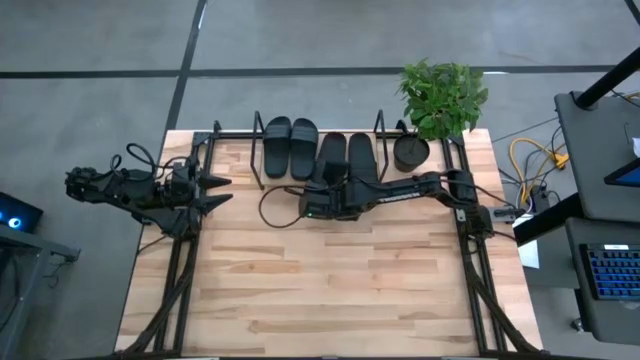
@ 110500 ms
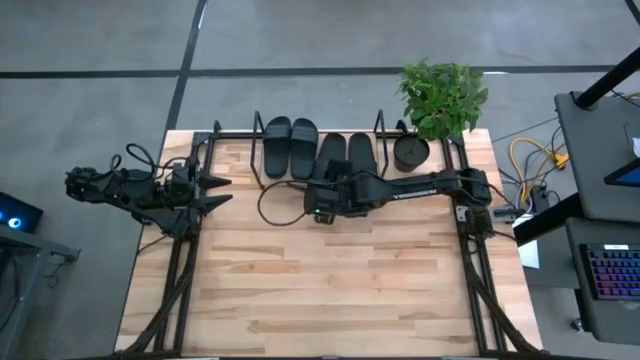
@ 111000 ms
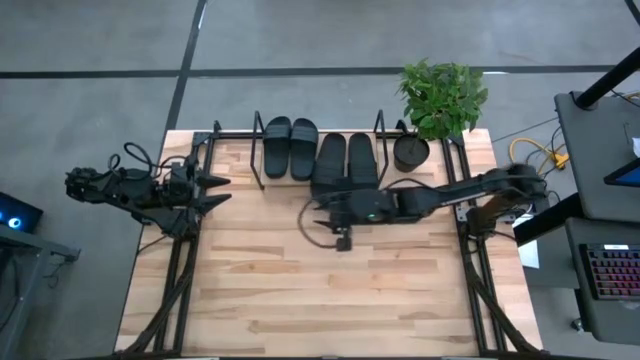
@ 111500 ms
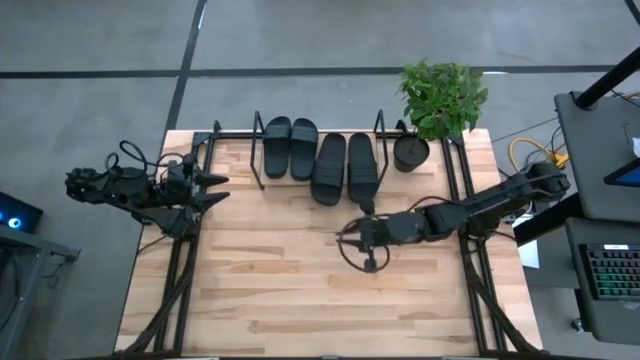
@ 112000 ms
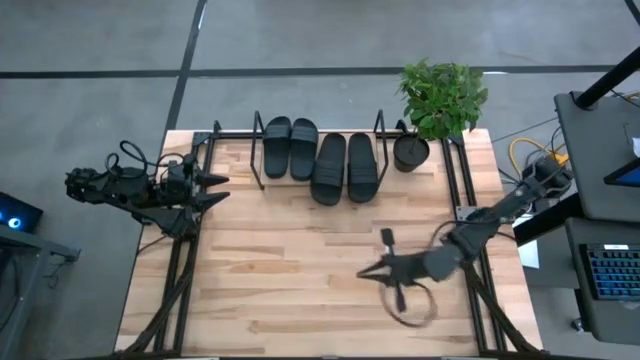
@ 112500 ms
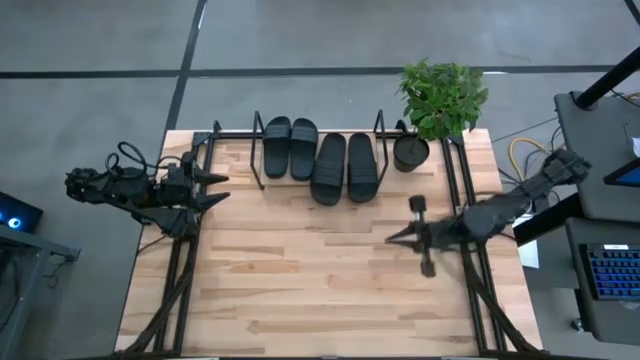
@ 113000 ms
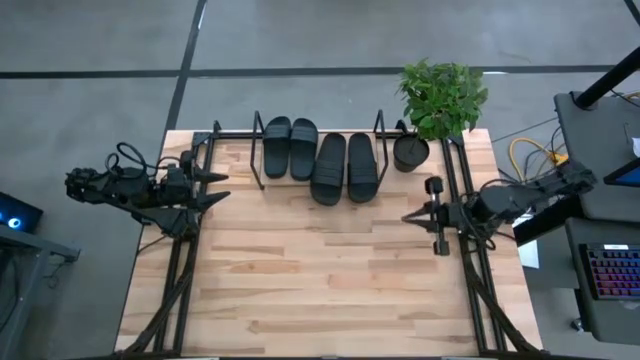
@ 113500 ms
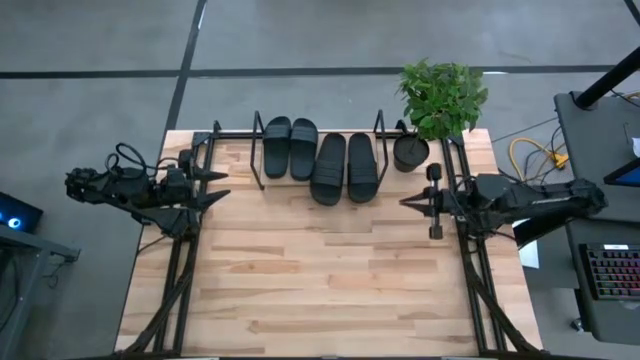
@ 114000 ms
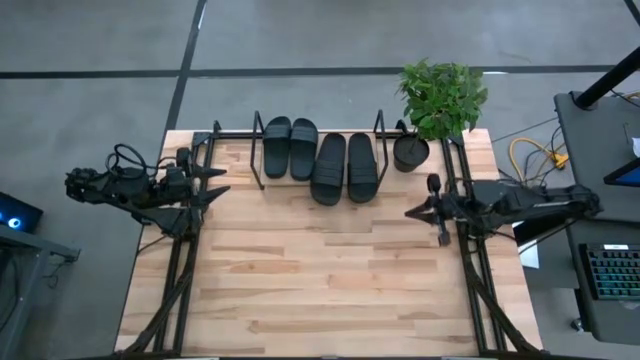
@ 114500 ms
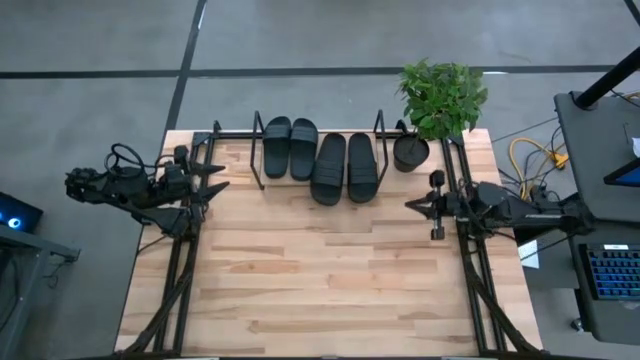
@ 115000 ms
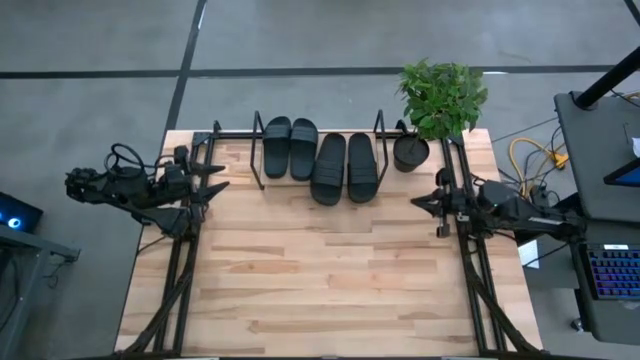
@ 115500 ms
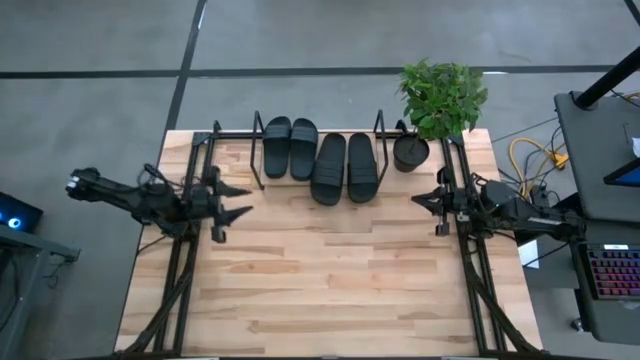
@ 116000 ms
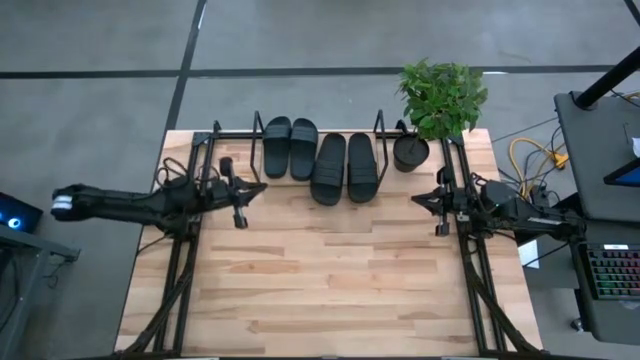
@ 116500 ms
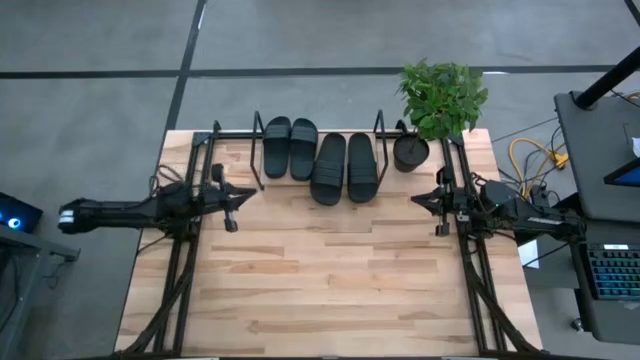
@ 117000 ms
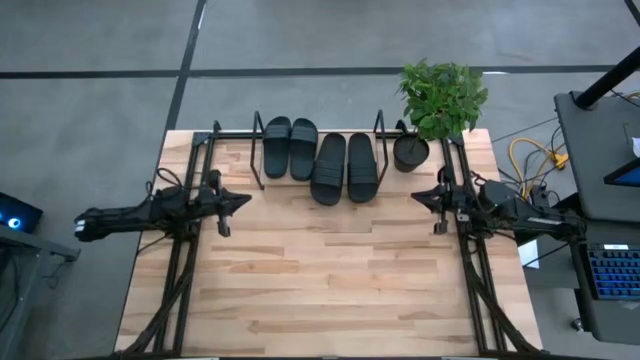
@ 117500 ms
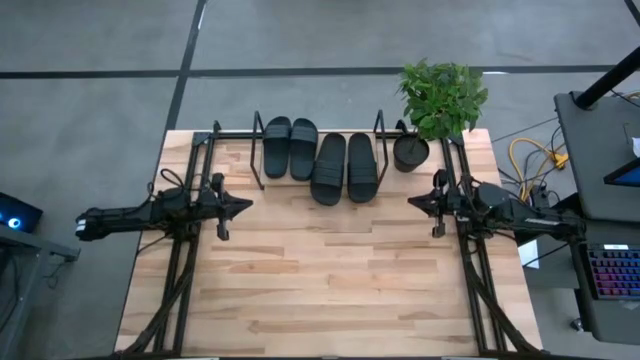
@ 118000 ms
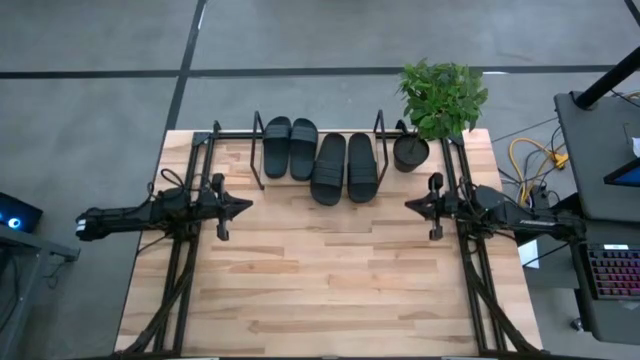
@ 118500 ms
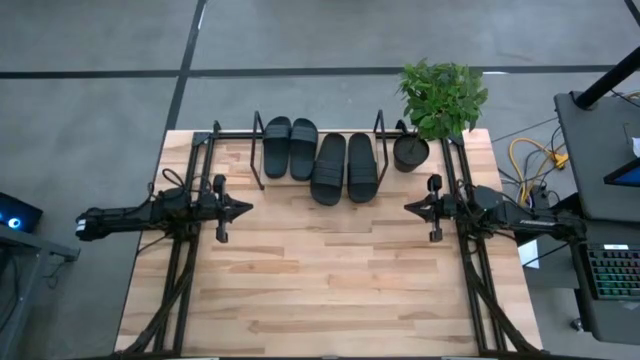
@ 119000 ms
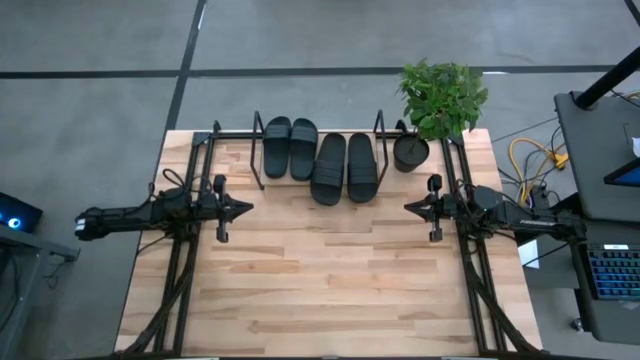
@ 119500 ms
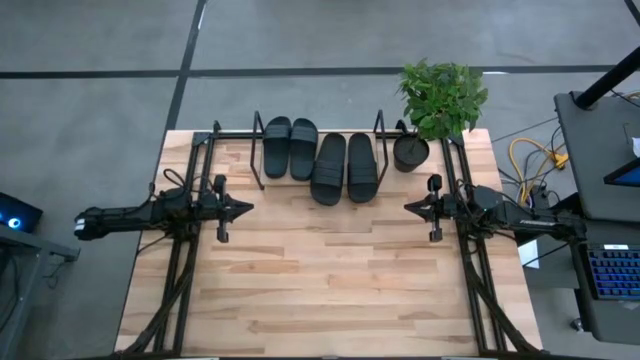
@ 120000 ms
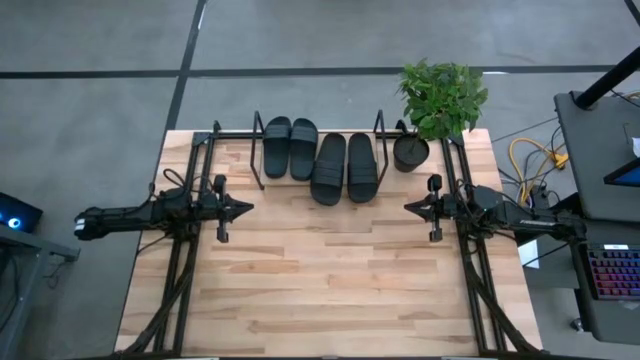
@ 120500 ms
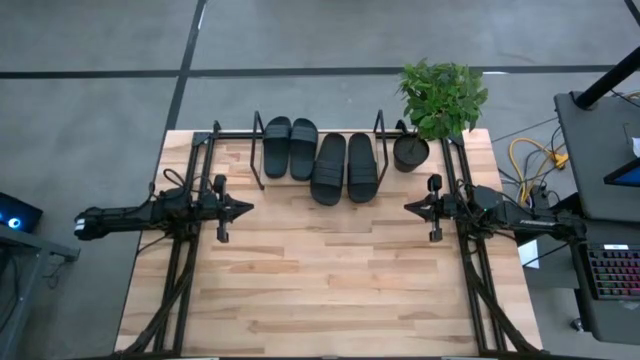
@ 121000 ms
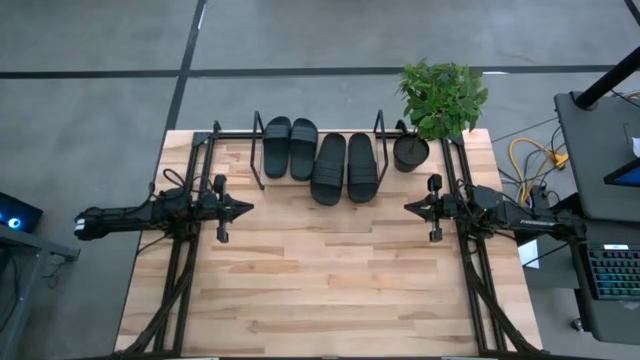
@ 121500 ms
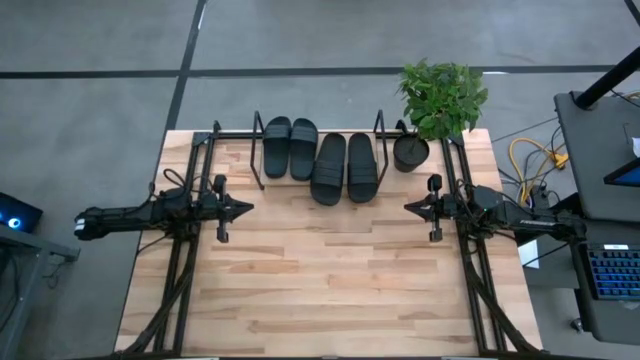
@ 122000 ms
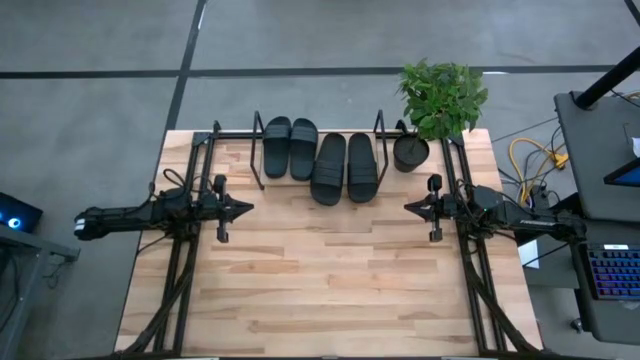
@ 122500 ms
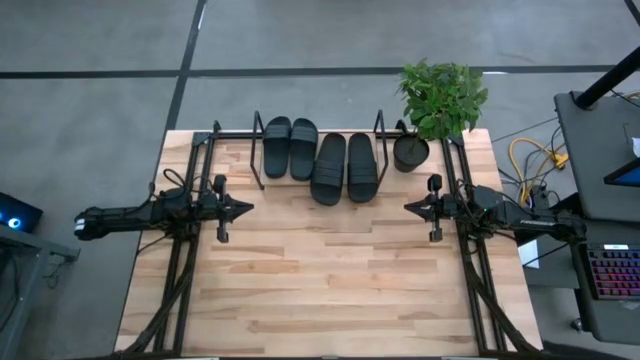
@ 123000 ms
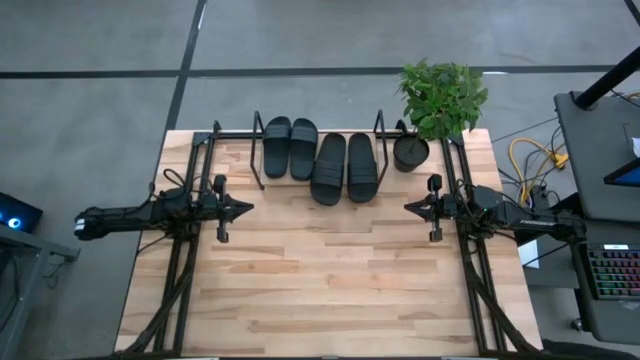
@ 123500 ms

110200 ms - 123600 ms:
Task: Pick and place slides into the shelf
Return to home position

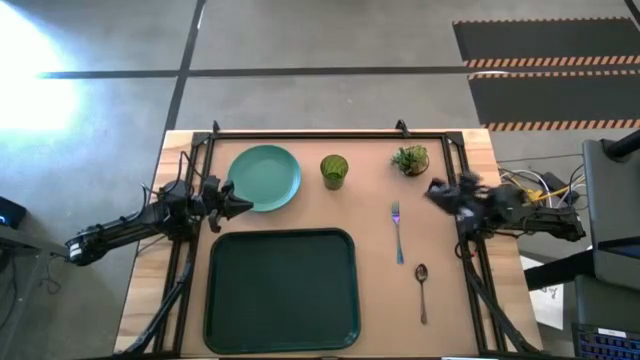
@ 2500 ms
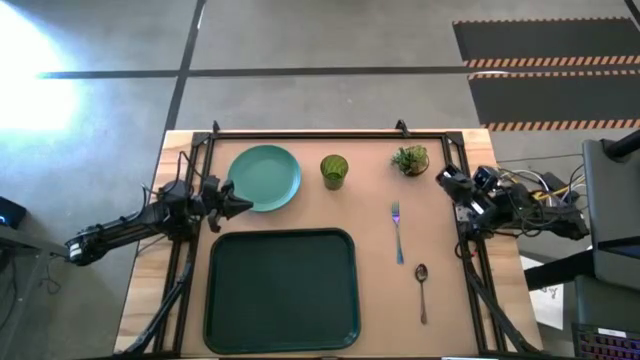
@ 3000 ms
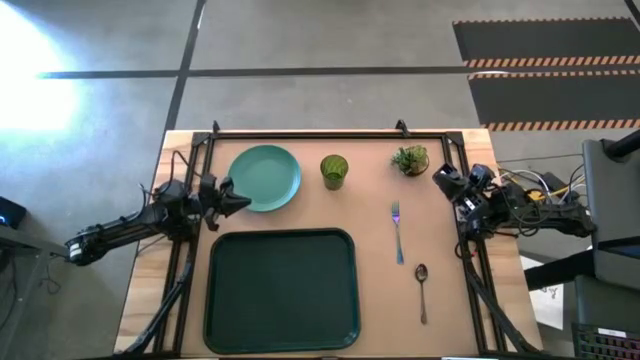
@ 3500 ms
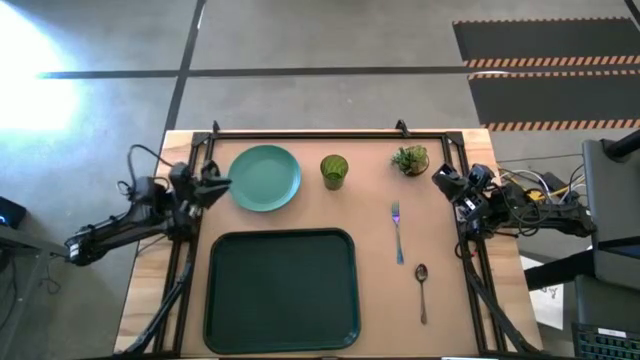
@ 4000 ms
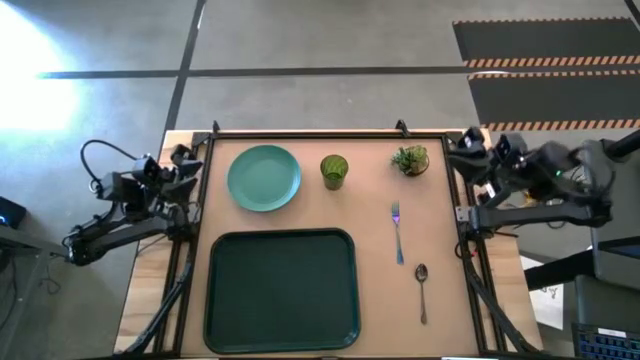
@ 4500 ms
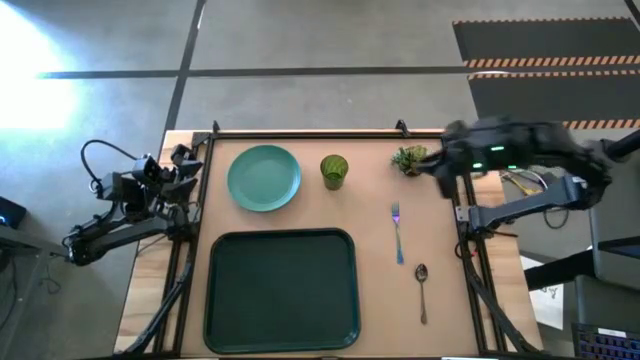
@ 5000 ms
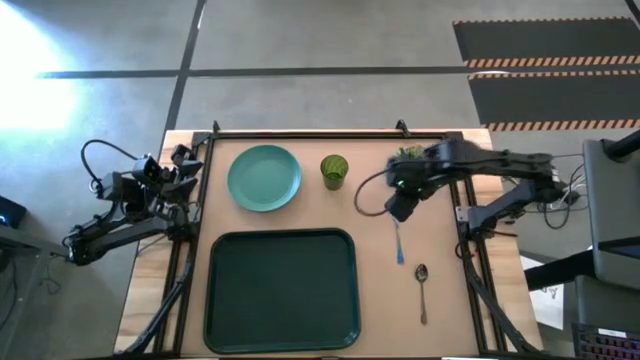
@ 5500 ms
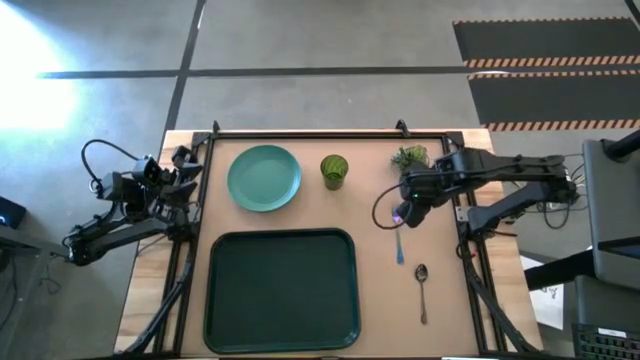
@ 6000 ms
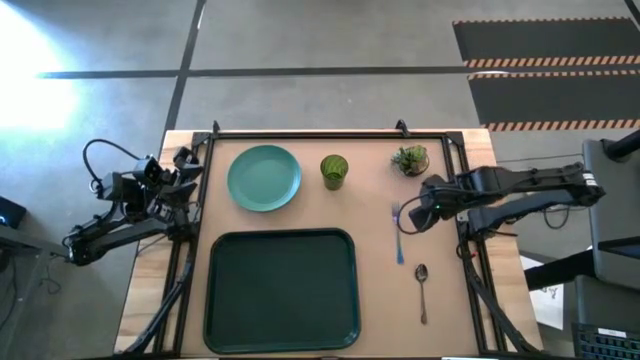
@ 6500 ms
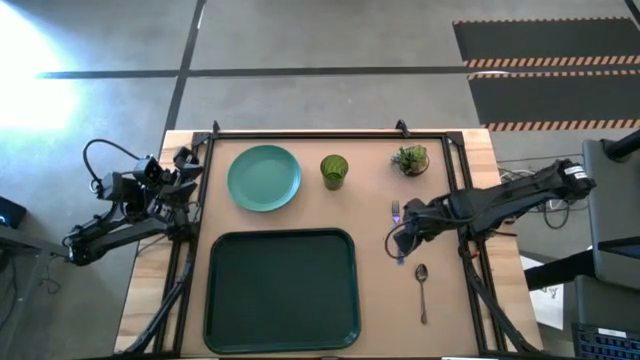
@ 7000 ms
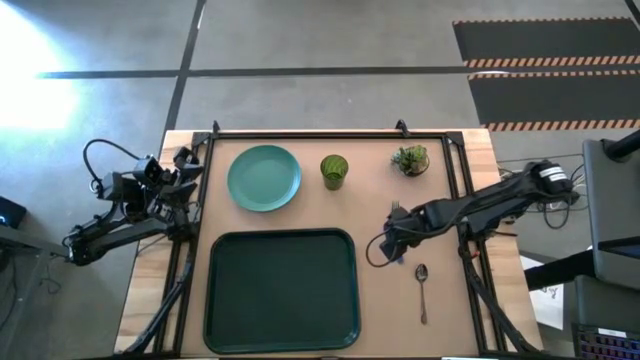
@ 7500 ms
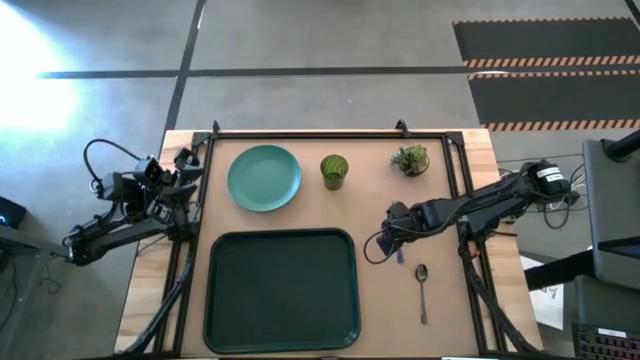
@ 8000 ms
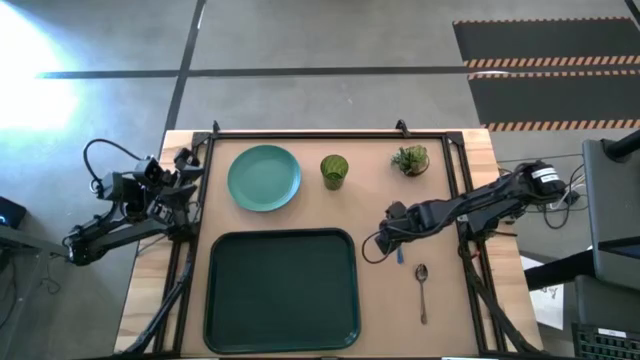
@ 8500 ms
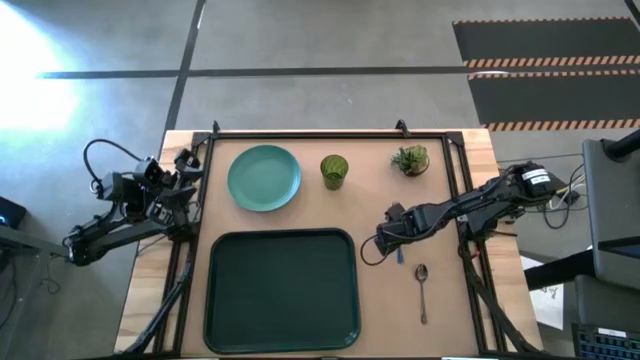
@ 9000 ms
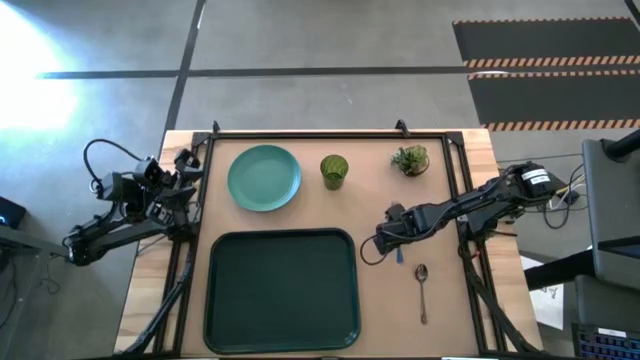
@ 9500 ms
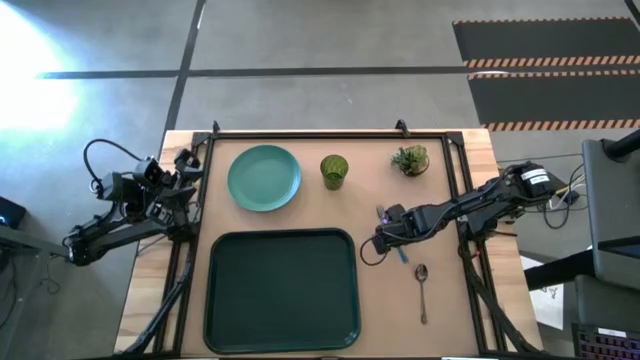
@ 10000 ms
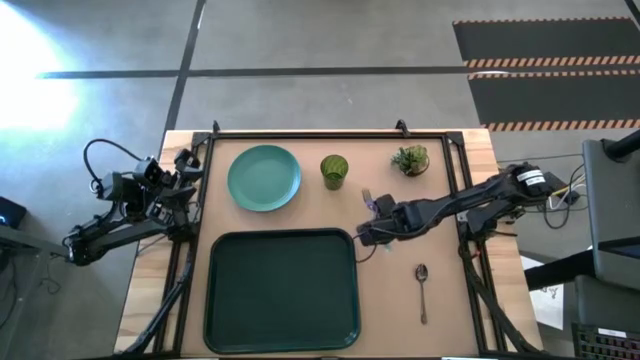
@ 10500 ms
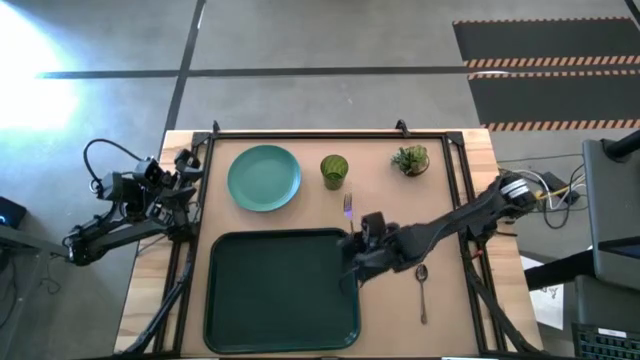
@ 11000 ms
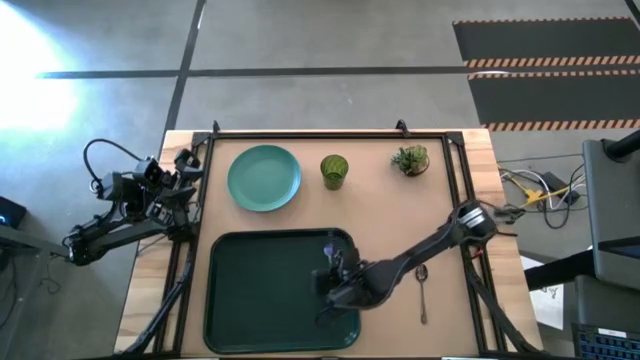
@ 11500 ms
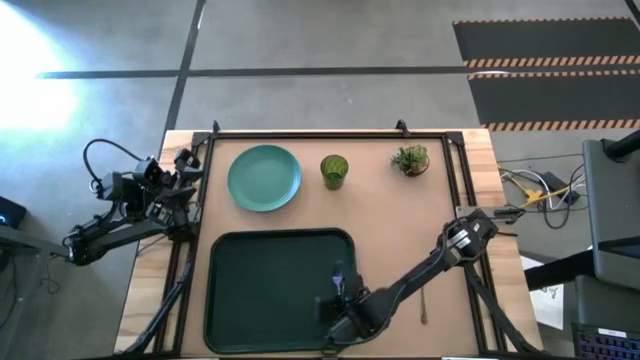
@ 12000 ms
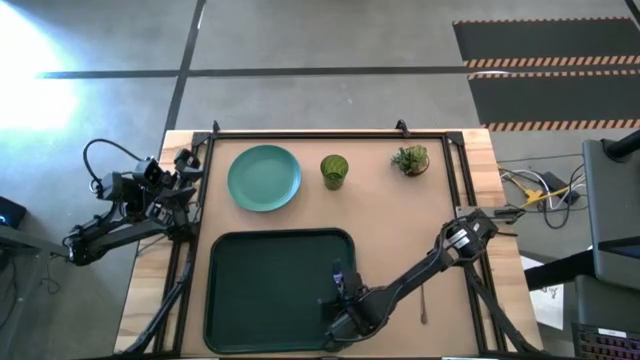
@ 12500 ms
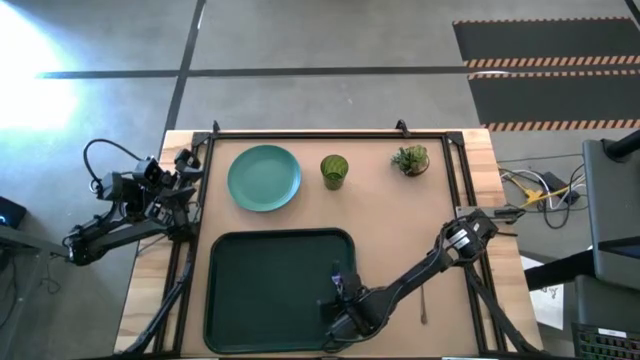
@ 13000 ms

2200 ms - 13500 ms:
Task: Pick and place plate/cup/fork/spoon on tray
Put the fork on the right of the serving tray
